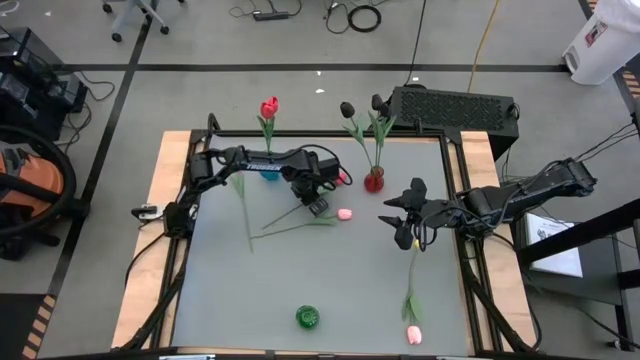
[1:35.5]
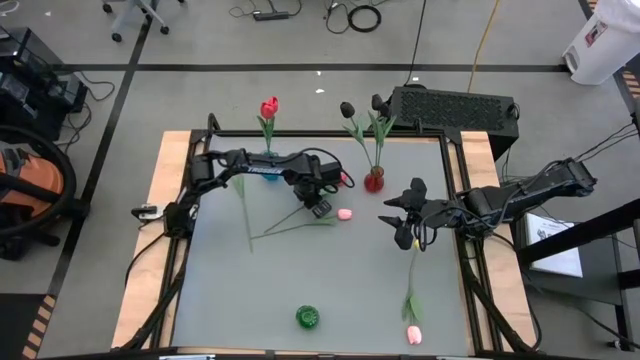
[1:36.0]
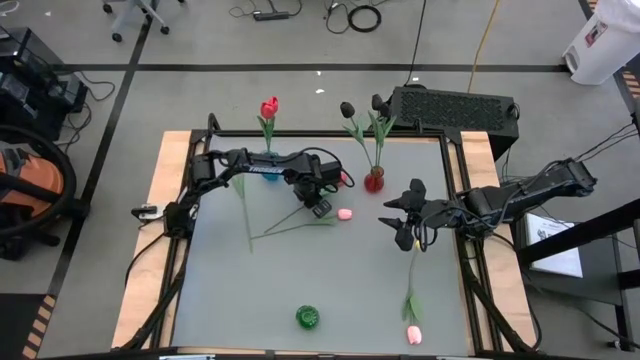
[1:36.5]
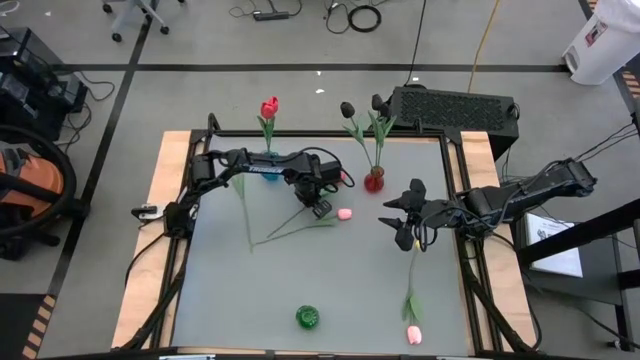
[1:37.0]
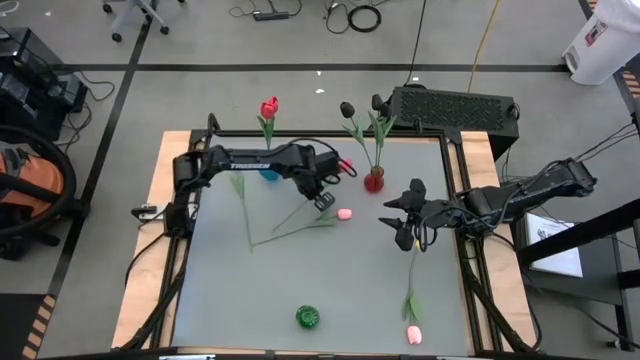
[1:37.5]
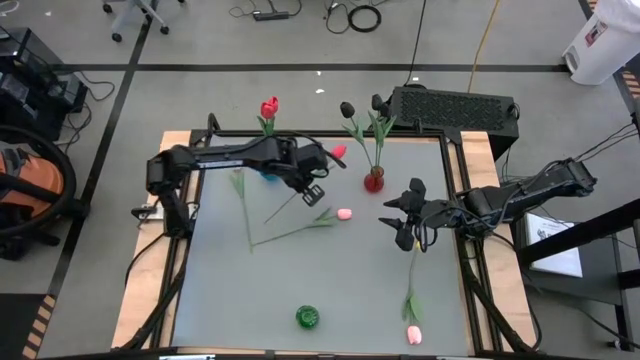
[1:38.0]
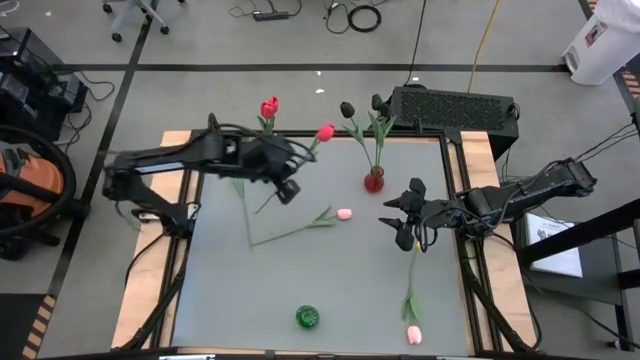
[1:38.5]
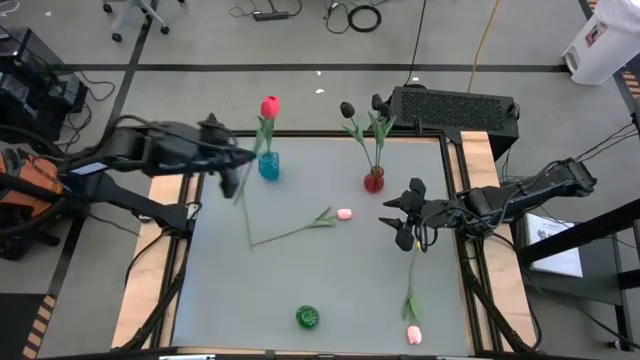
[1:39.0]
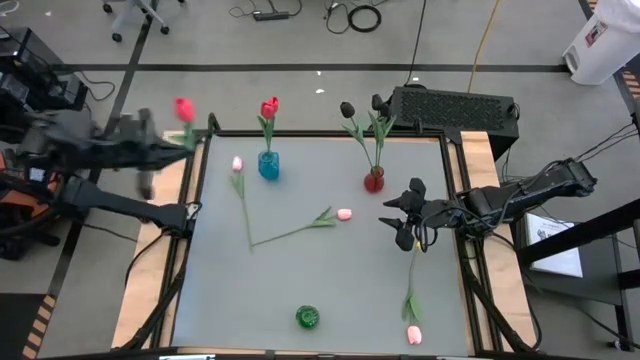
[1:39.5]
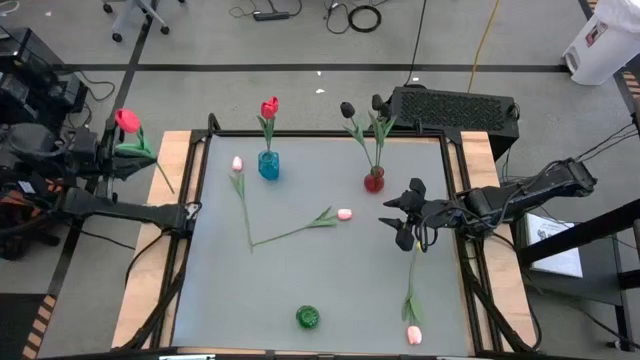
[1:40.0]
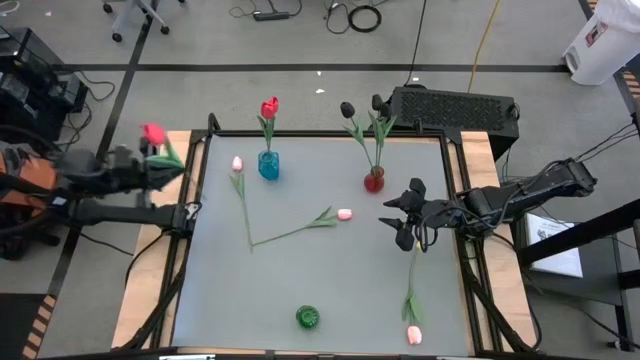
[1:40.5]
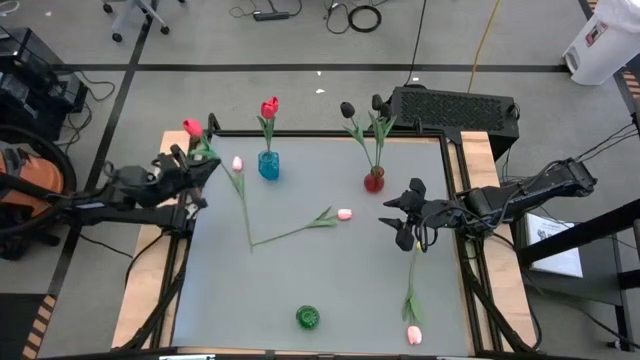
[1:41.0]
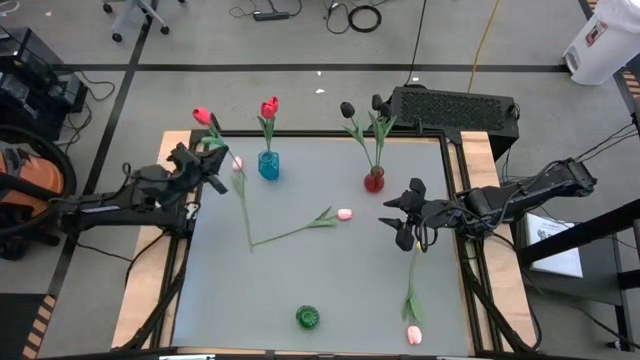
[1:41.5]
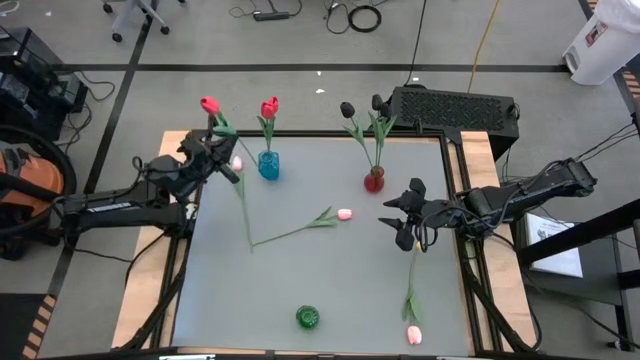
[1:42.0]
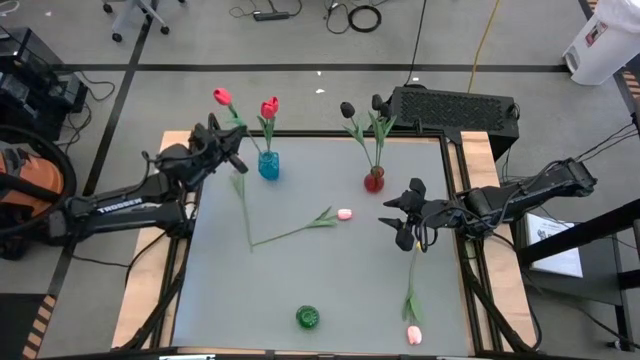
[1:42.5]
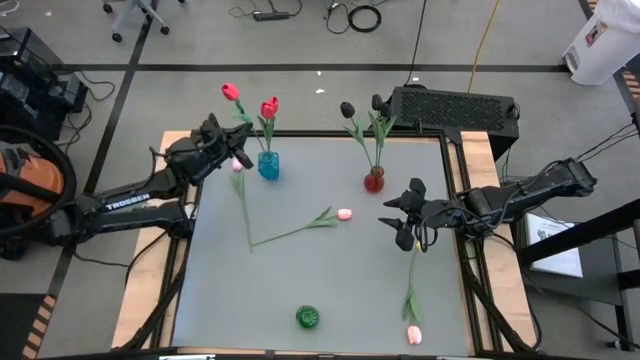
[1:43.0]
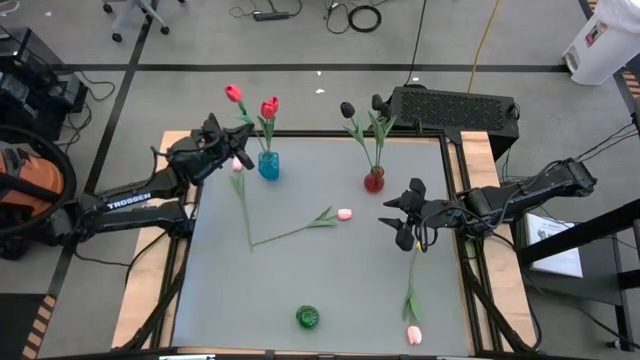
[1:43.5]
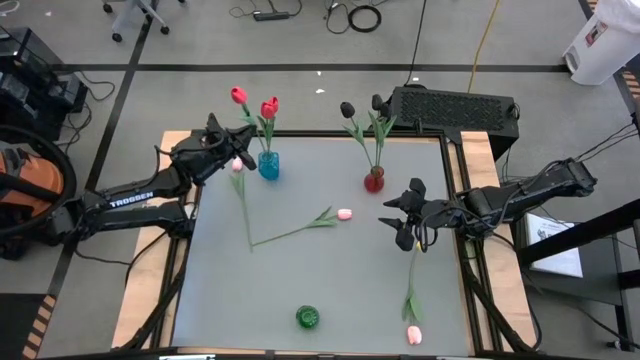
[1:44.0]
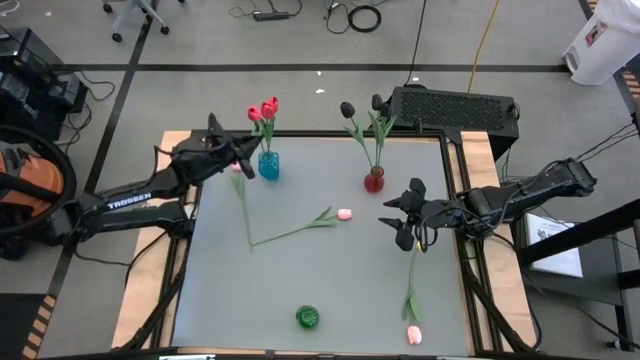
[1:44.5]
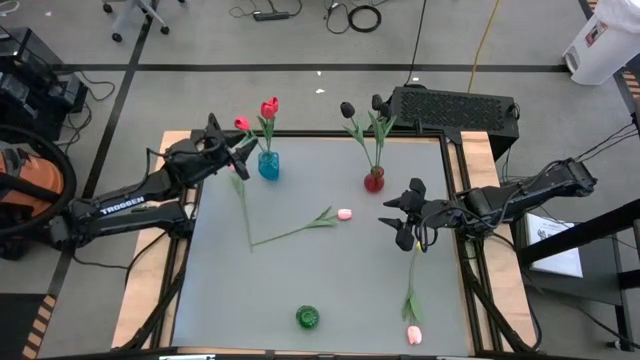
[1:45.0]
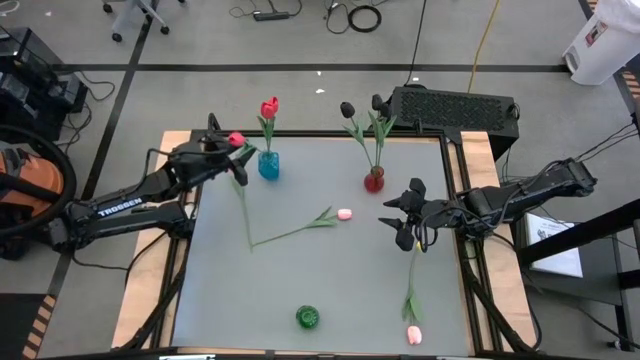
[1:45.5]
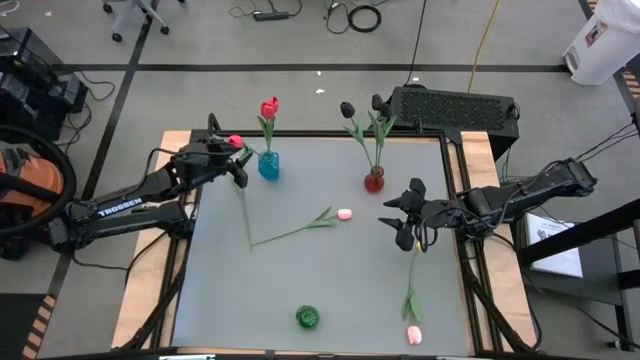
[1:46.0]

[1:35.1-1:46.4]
Task: Sort flowers into vase by color
Put the orange tulip into the blue vase

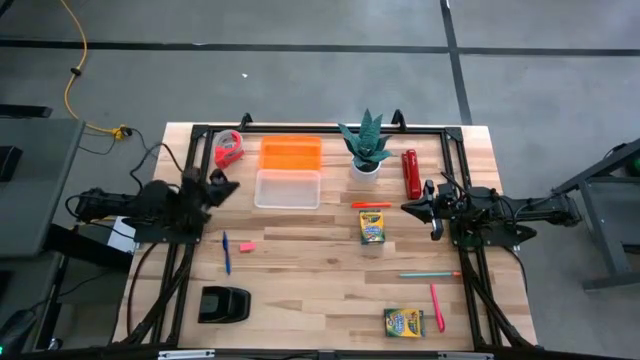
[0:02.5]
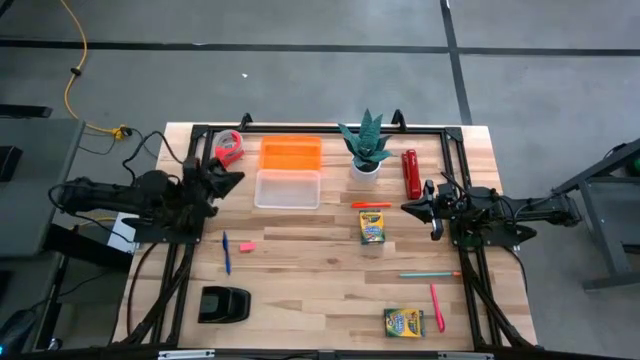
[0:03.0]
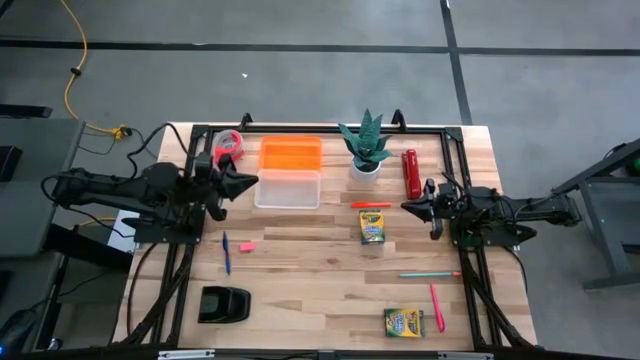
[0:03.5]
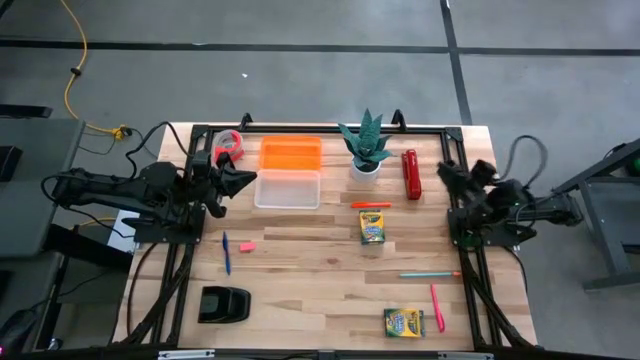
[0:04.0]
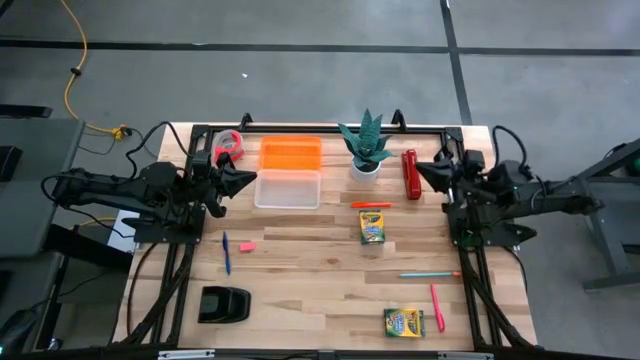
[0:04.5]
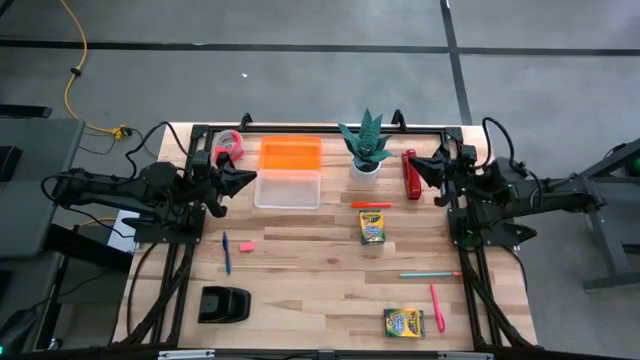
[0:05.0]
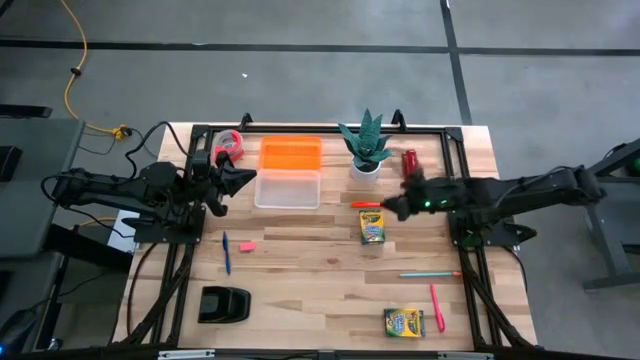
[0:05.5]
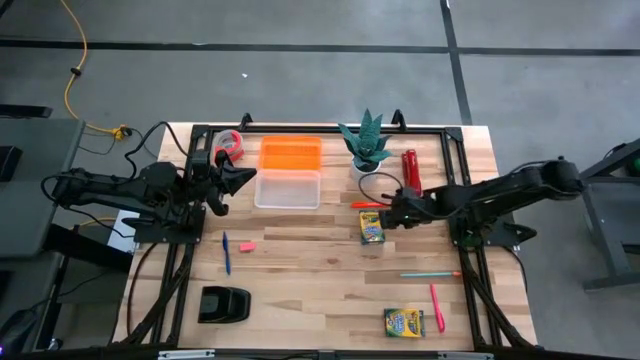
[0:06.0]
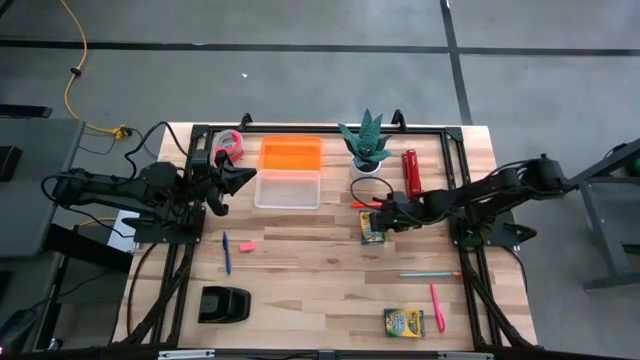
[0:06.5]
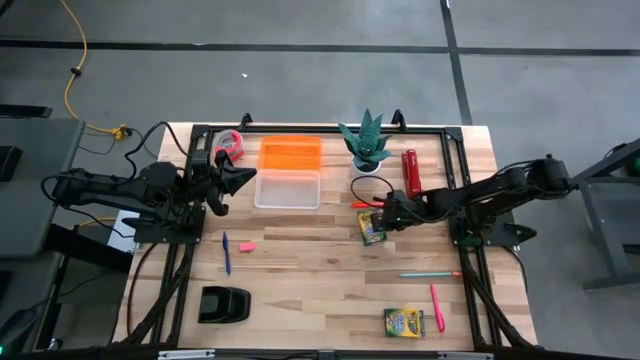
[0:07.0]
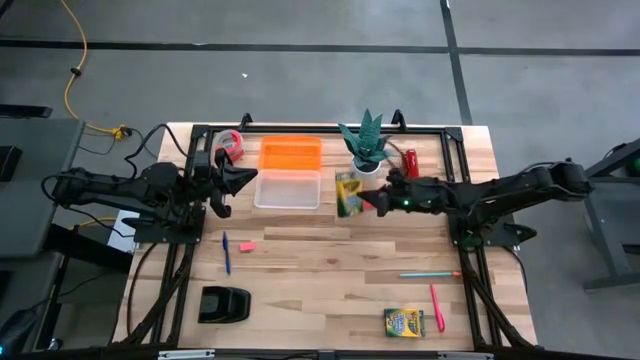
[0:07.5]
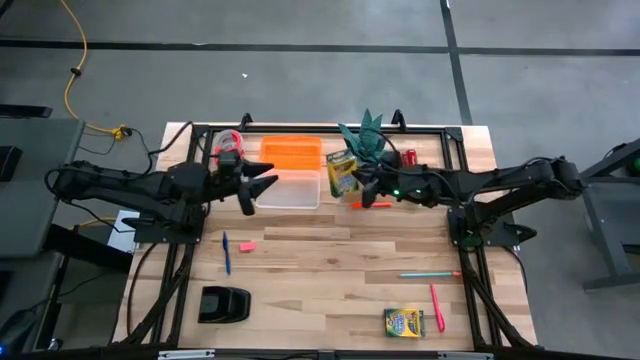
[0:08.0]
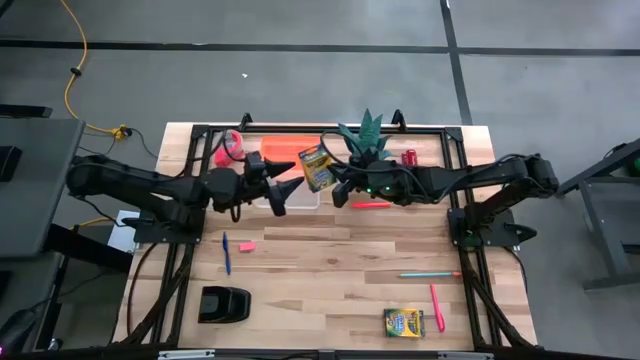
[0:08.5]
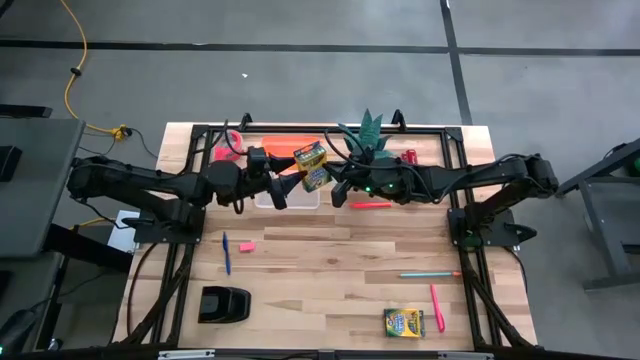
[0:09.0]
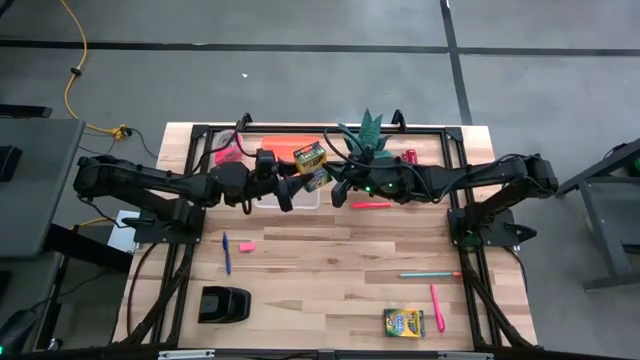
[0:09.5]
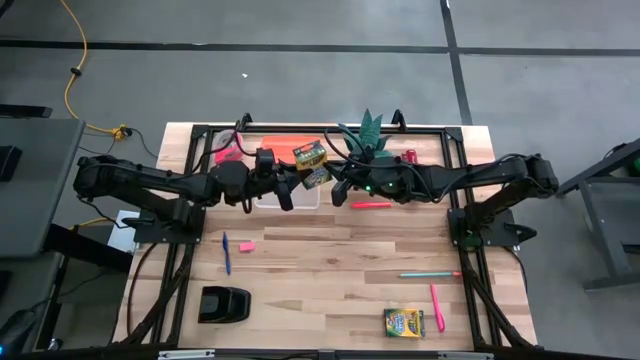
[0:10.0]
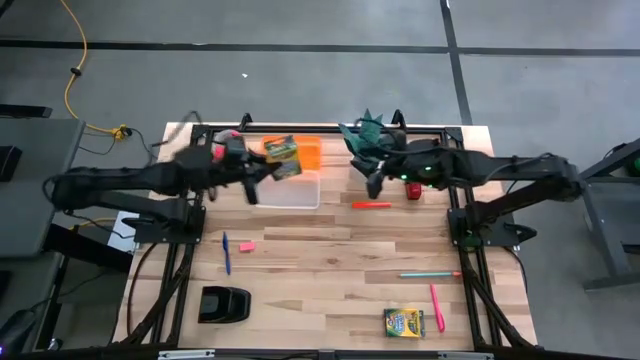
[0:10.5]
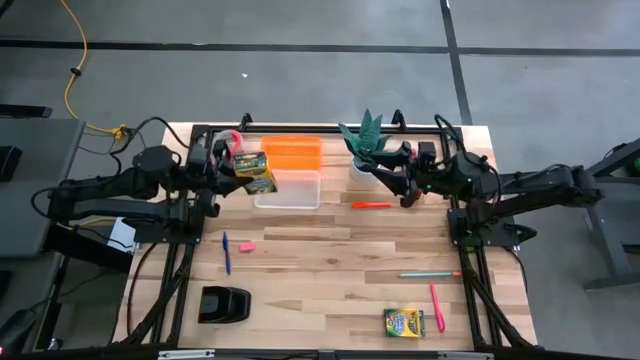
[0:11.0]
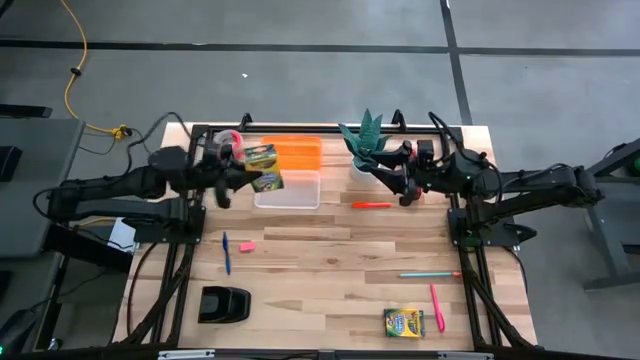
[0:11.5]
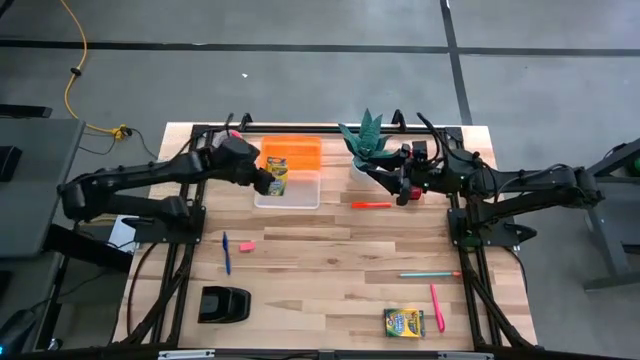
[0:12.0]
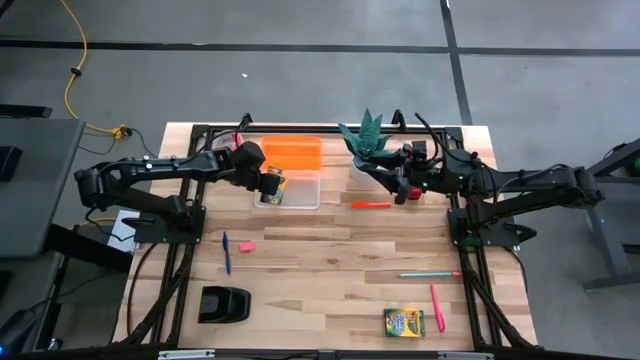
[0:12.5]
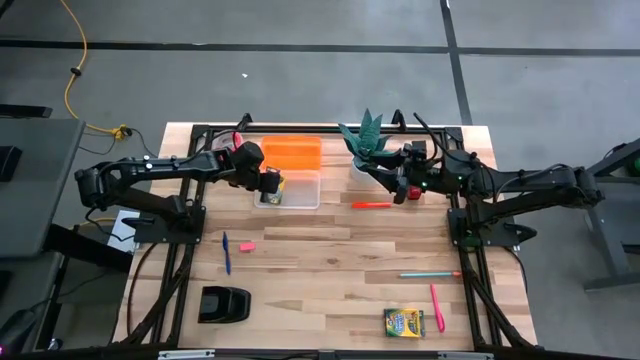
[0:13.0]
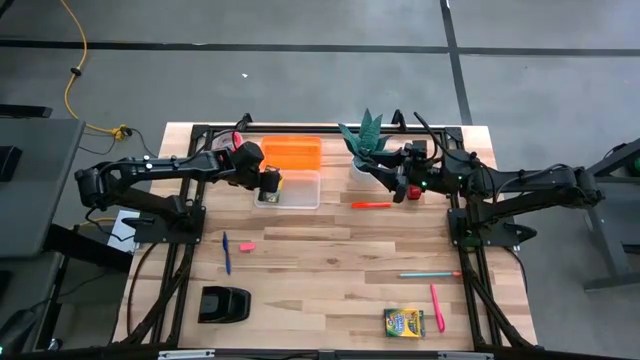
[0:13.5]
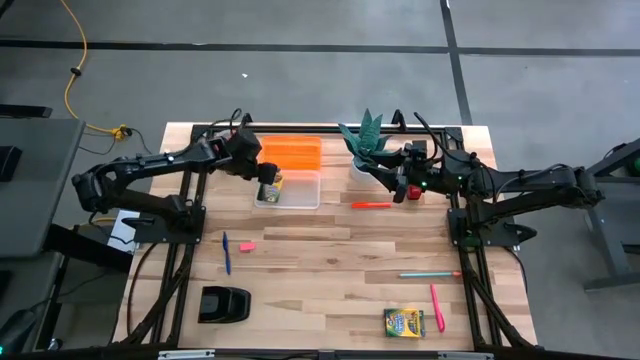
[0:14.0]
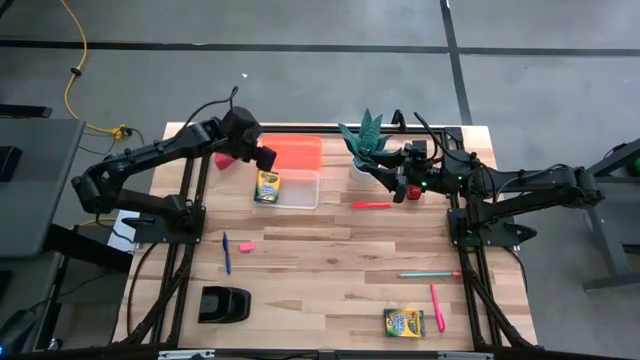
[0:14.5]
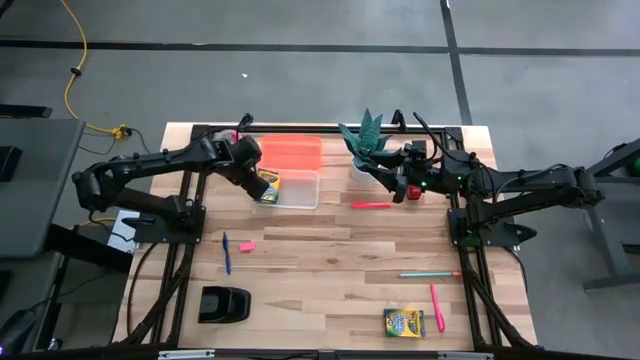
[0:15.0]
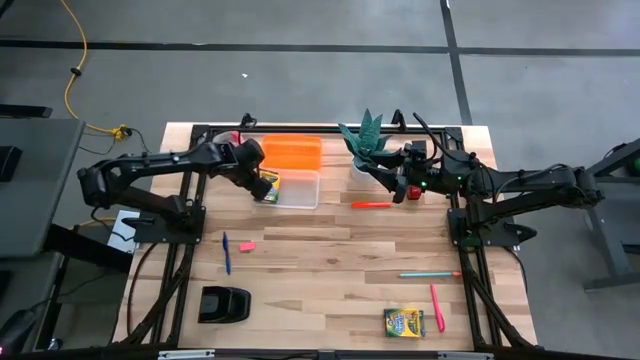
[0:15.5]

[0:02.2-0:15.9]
Task: Pack school essentials
Put the top yellow crayon box into the orange supply box
